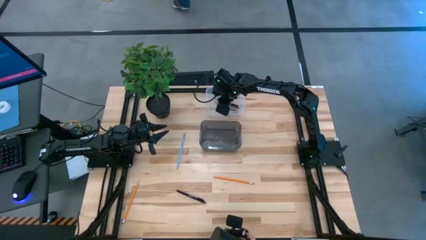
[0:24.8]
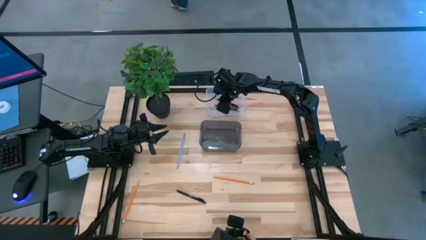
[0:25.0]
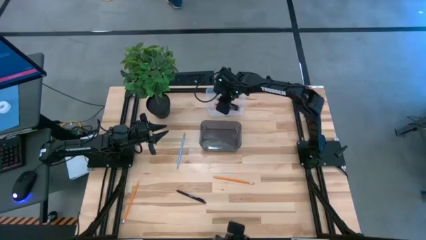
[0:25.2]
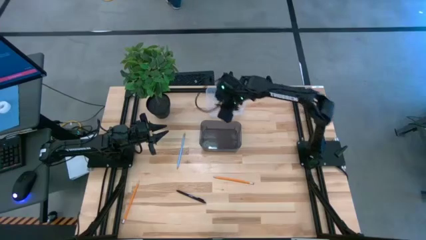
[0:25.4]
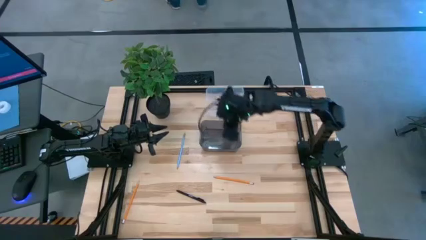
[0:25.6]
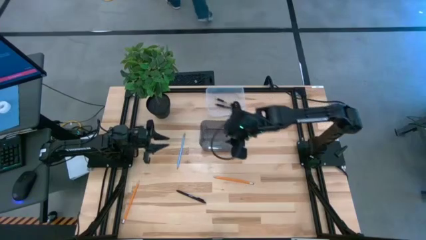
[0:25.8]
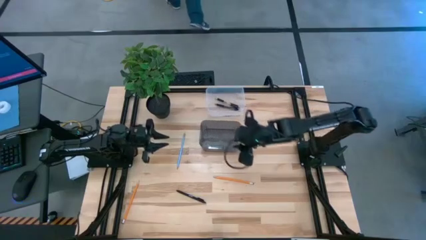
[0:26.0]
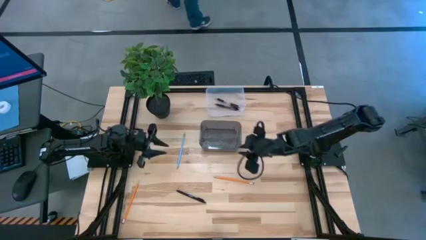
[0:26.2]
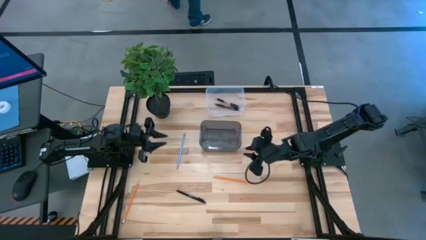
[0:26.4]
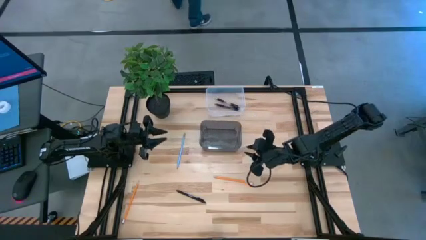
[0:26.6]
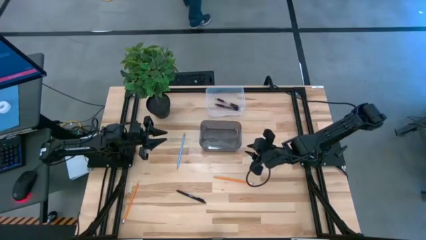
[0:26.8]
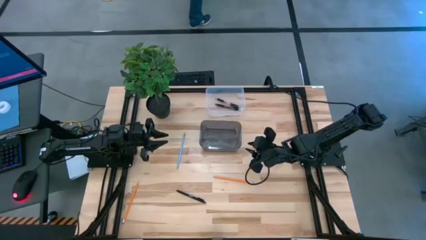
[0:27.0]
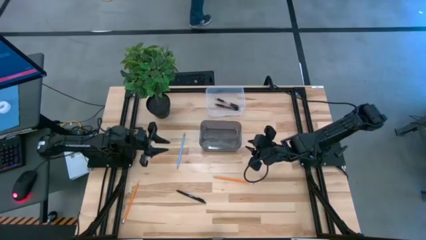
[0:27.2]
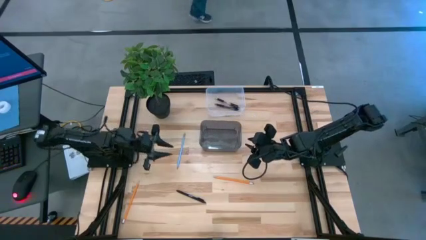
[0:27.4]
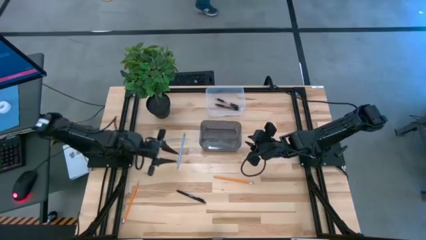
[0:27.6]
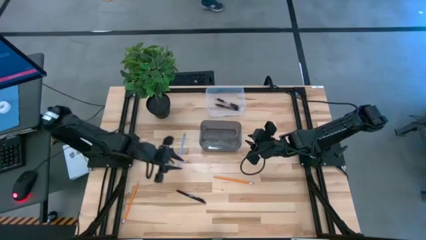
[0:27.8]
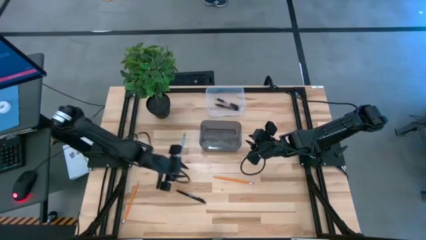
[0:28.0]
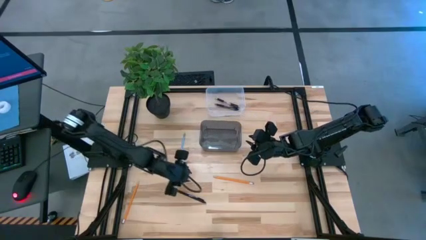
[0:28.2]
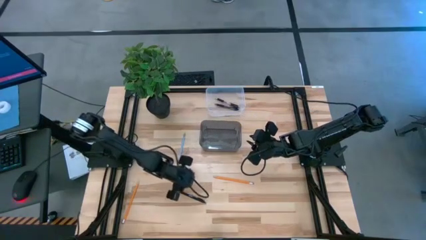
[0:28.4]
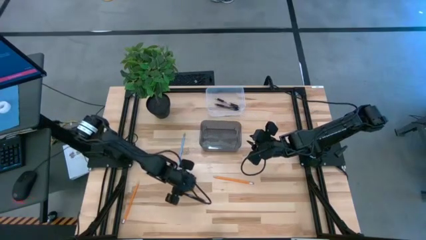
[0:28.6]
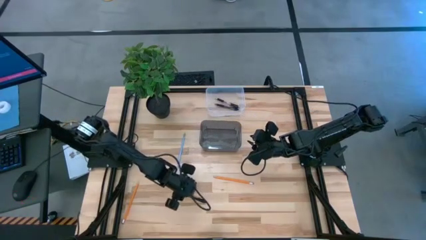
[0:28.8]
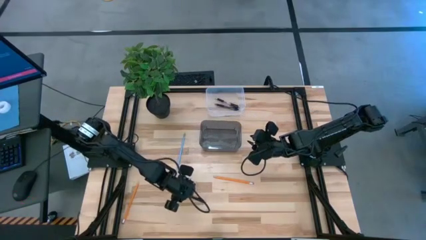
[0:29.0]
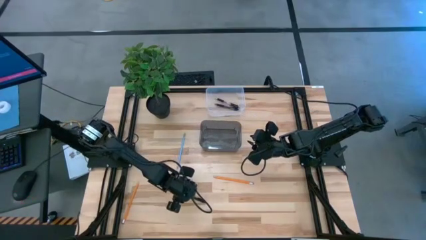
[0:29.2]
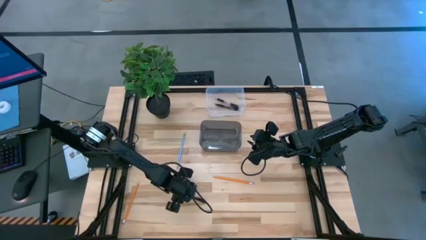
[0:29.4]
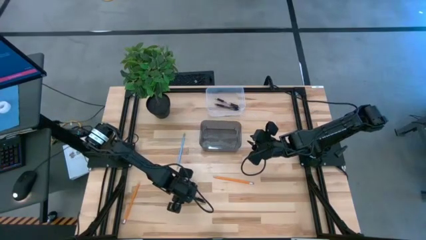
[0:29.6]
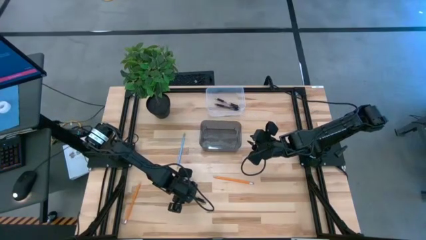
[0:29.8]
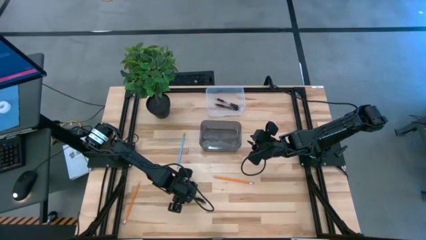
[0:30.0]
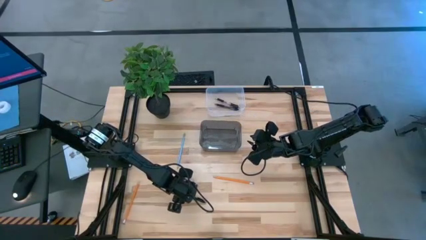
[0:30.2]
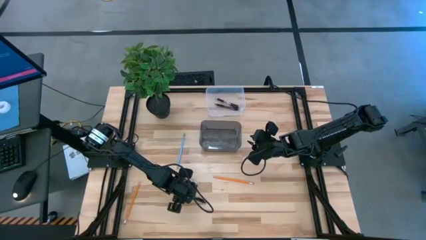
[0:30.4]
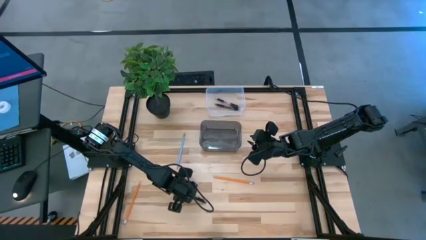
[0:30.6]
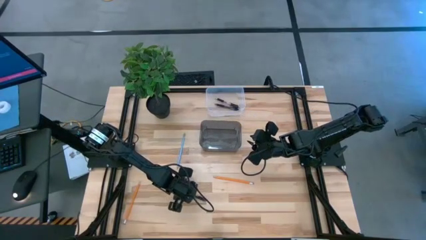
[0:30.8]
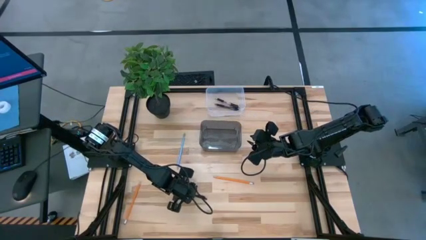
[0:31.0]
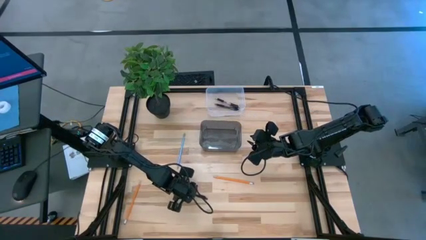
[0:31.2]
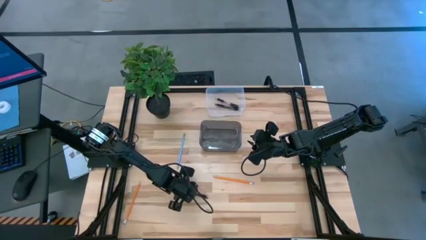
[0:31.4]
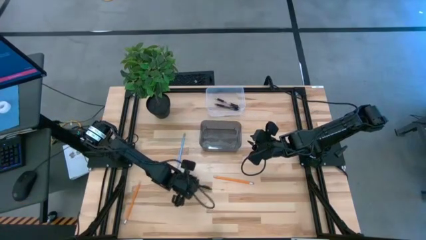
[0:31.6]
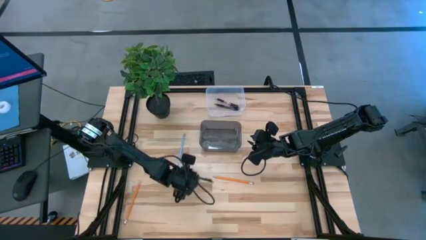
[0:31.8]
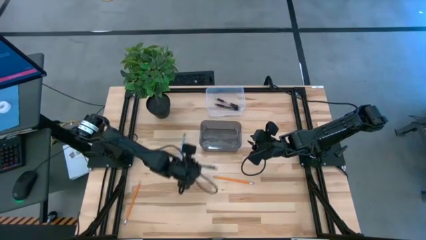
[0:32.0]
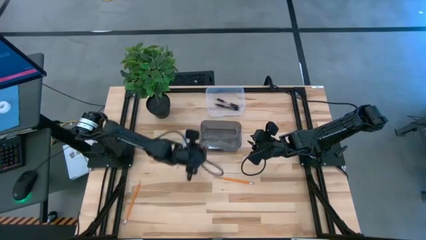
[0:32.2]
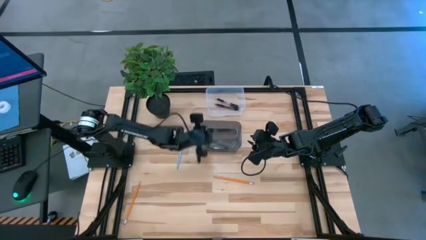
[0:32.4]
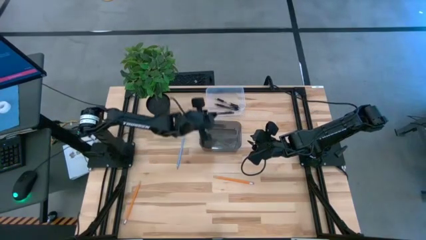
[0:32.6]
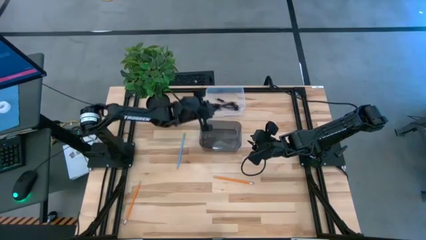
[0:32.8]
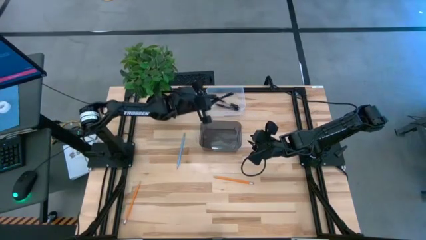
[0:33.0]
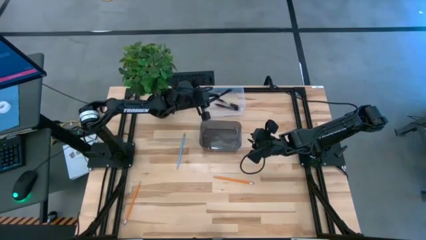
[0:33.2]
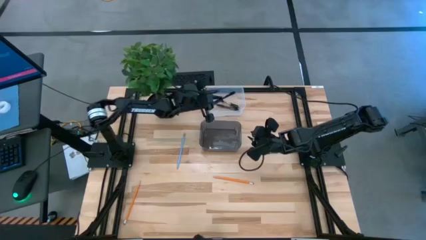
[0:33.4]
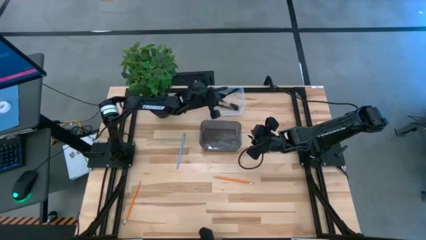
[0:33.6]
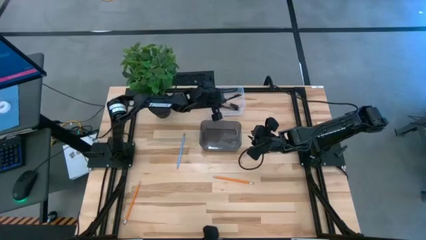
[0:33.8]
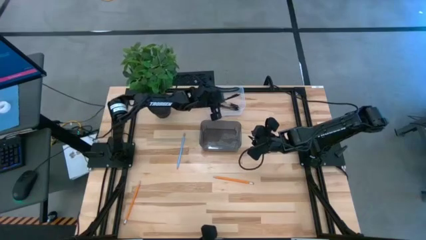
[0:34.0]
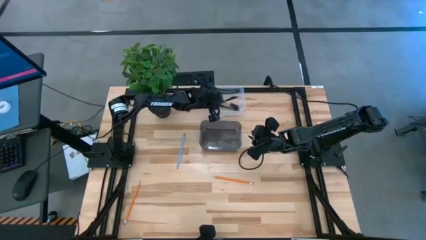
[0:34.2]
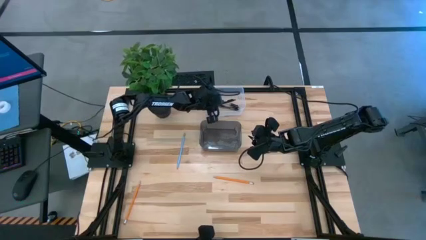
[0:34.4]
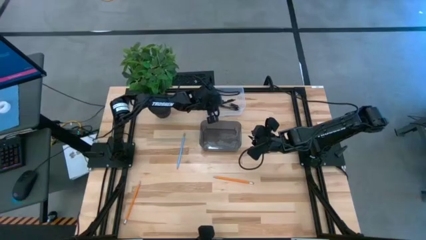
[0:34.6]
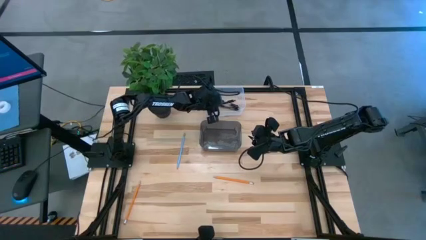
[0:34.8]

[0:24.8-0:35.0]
Task: Sort pens & pencils
Put the black pen into the transparent bin
